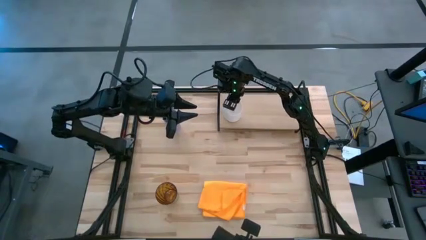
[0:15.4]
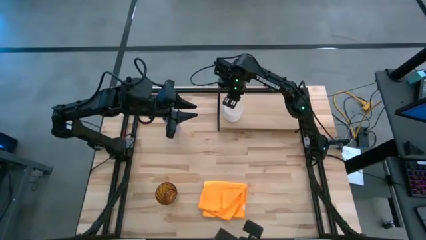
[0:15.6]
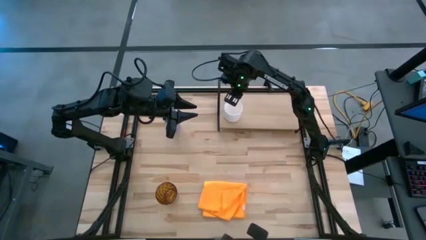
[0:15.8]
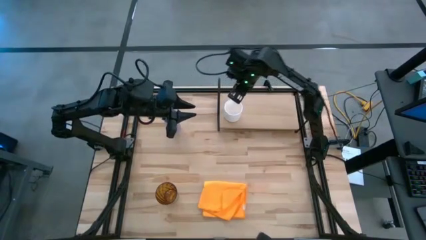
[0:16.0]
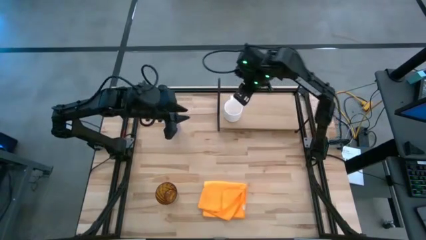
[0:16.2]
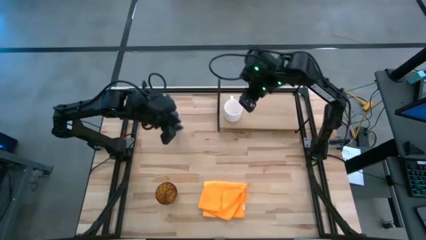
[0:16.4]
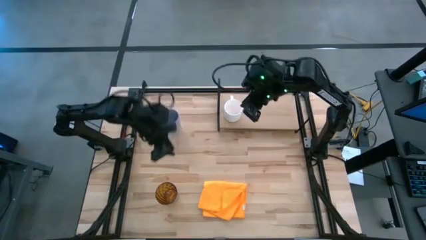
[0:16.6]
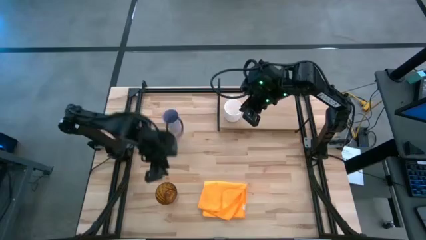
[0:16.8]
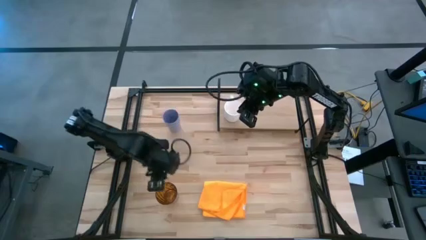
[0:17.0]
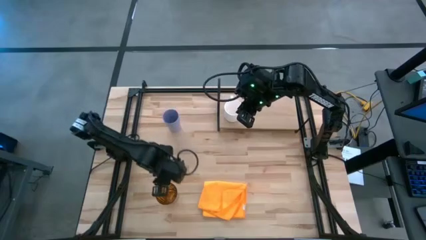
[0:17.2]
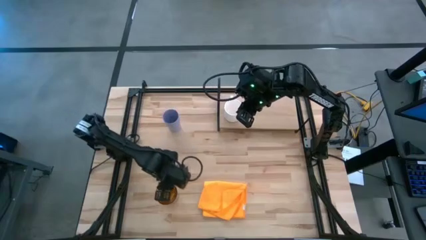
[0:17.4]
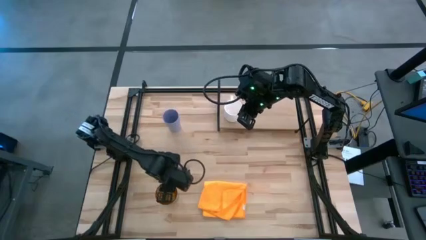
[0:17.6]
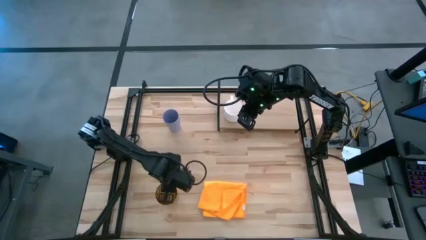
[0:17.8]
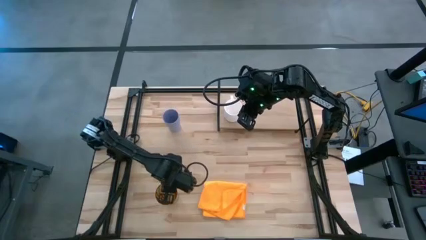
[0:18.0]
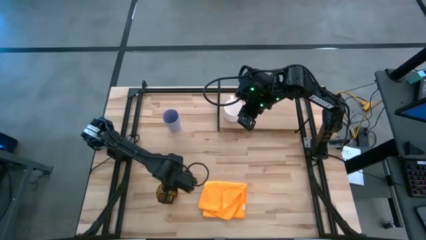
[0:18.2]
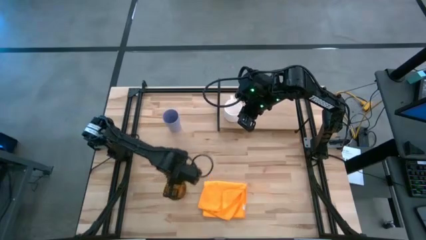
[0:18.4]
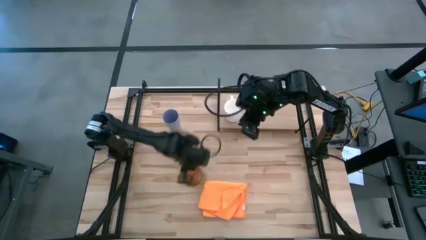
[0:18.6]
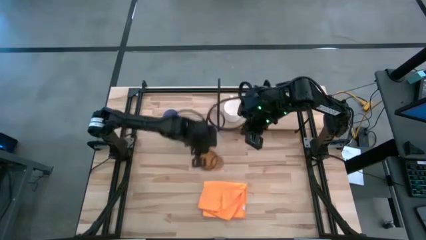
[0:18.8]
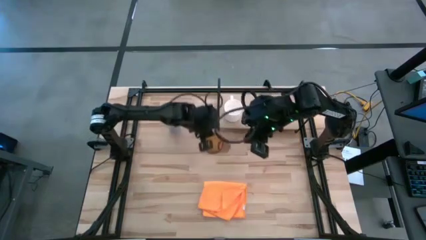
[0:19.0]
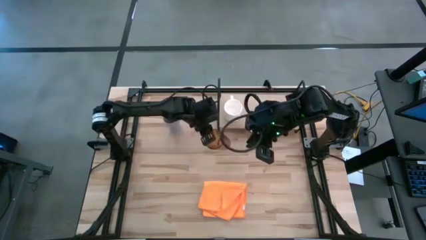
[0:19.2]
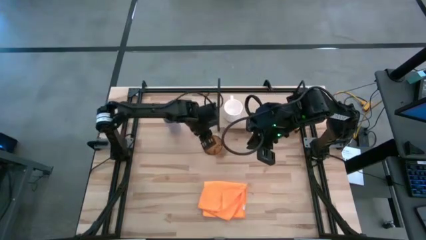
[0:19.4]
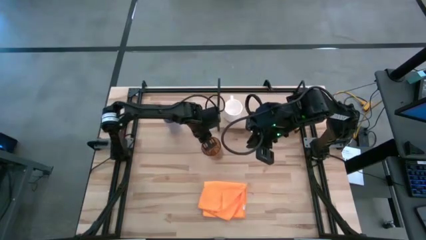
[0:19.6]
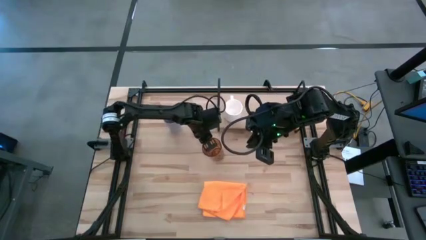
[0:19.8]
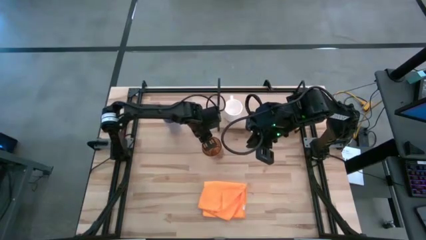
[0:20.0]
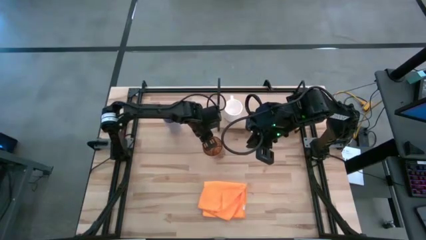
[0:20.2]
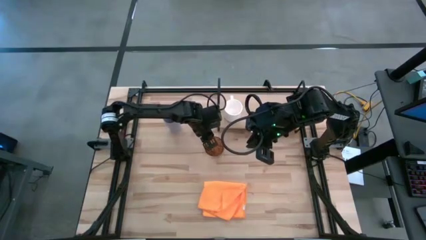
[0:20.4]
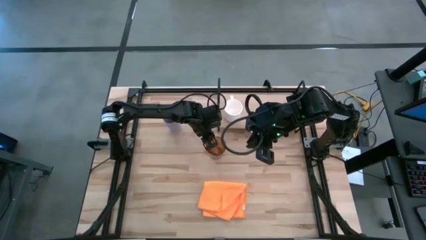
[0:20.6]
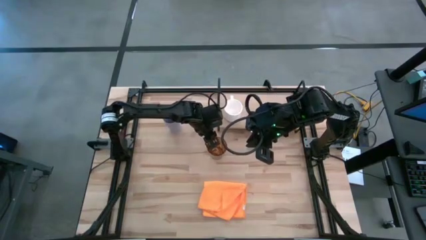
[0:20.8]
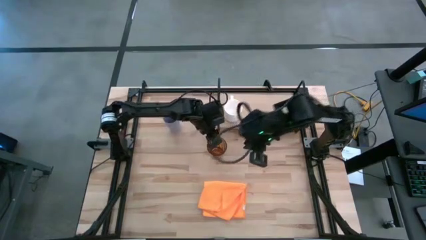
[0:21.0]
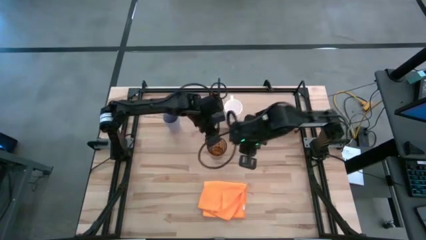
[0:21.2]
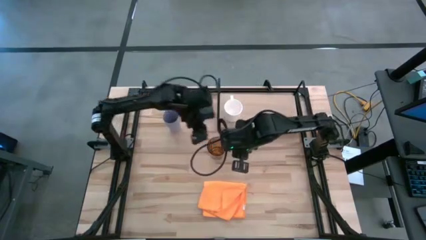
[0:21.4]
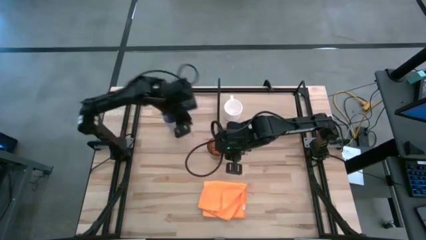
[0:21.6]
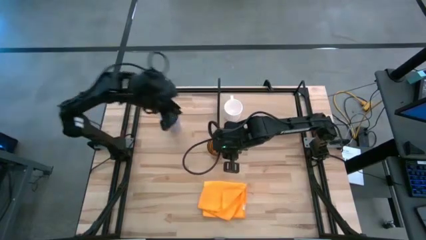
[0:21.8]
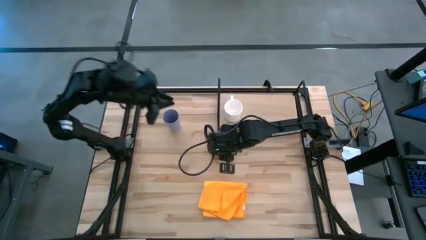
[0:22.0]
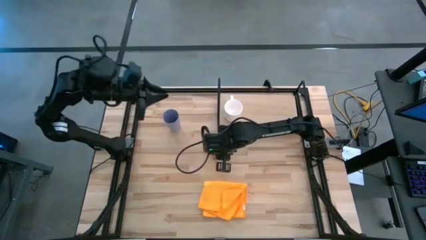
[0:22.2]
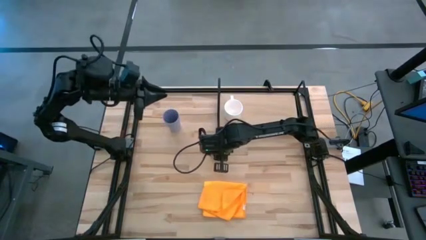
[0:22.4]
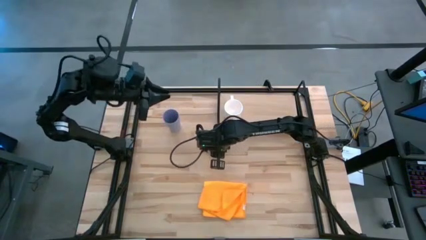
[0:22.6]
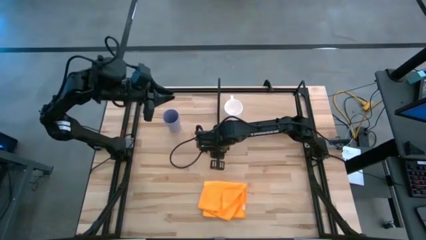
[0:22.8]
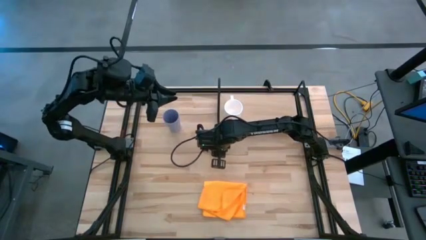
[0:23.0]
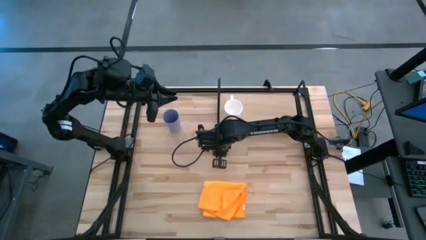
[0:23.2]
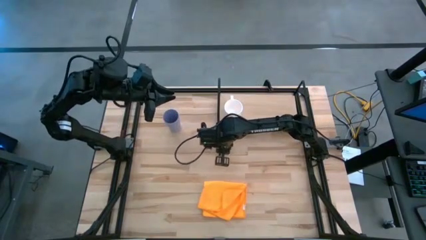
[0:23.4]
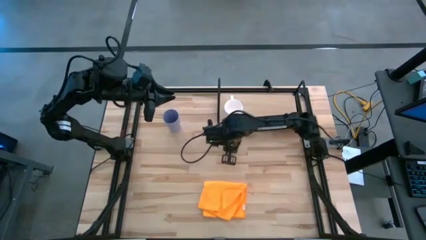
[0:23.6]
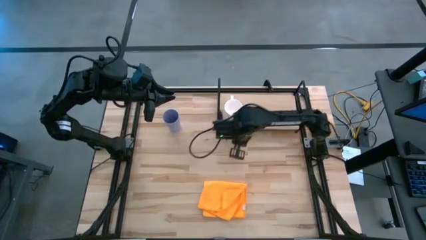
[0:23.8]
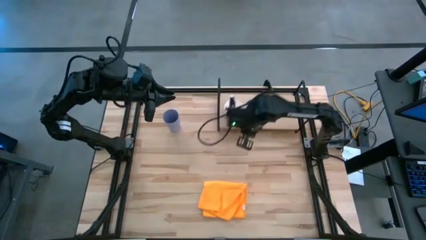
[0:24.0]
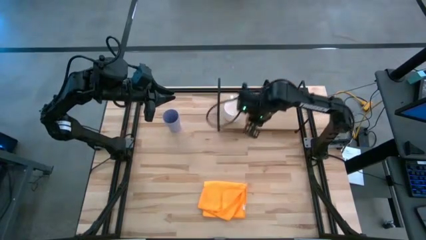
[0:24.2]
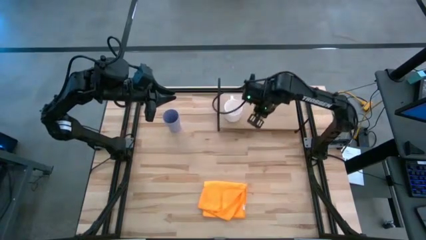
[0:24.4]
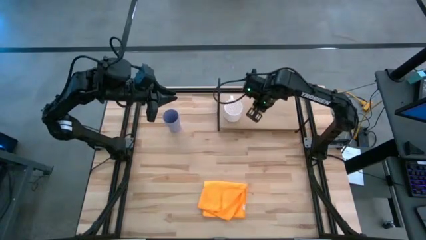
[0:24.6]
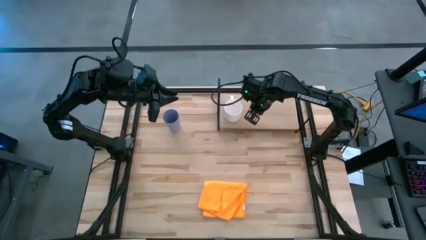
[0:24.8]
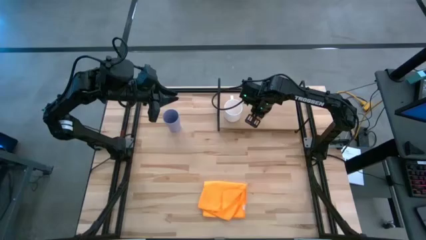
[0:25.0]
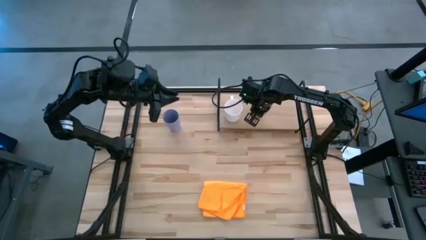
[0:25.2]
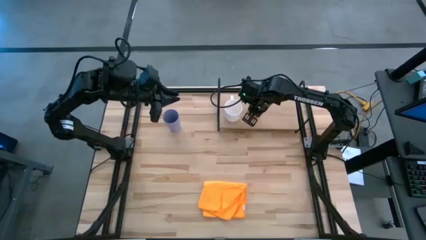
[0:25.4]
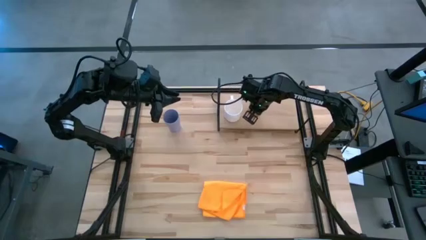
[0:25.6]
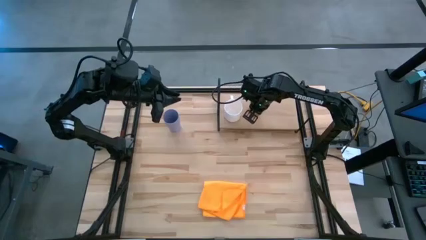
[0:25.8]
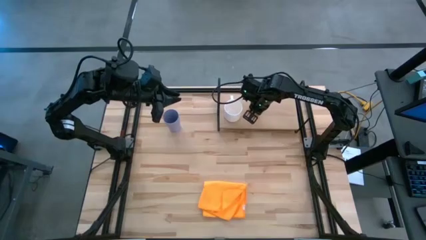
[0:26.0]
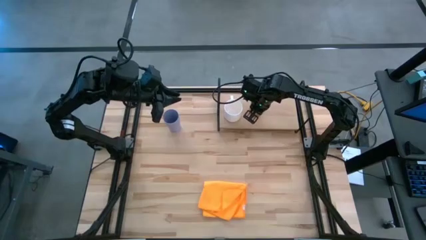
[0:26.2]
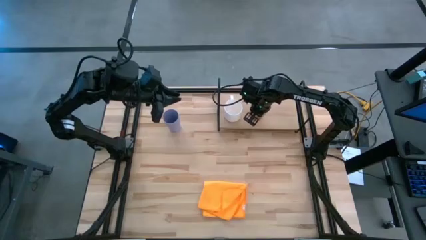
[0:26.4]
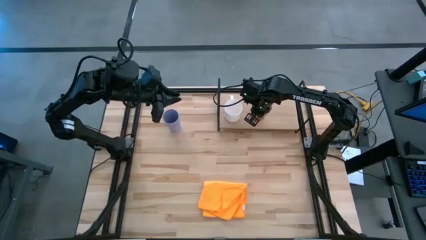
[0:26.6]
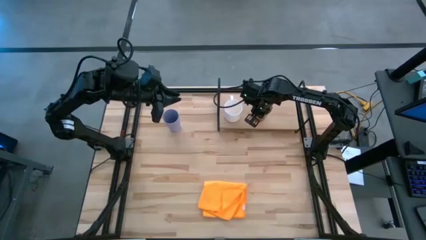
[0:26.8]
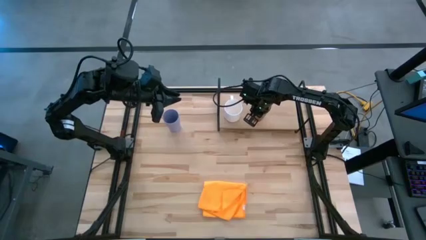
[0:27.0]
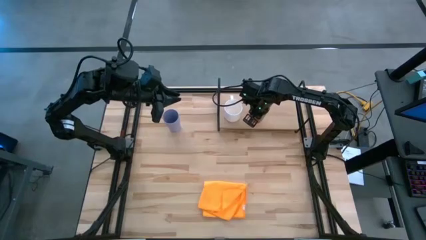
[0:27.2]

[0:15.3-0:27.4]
Task: Stack small to large cups/mugs on shelf
Put the brown cup on the shelf

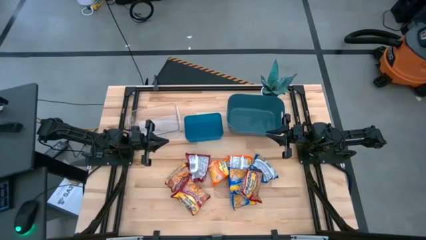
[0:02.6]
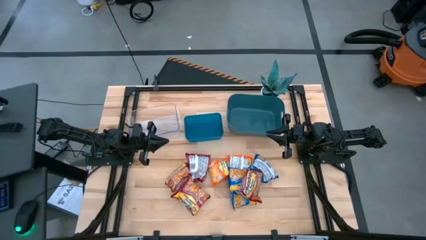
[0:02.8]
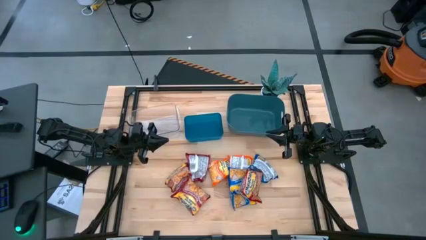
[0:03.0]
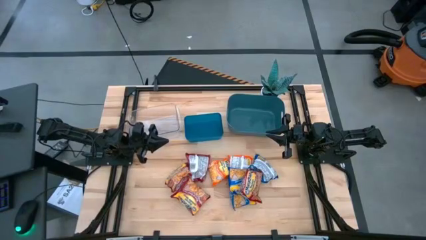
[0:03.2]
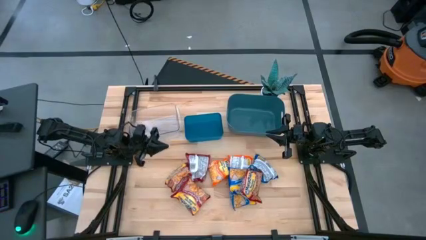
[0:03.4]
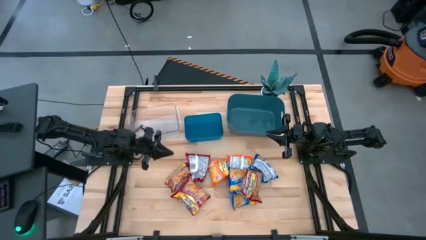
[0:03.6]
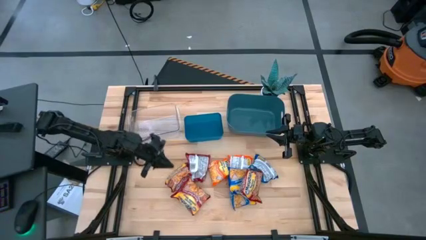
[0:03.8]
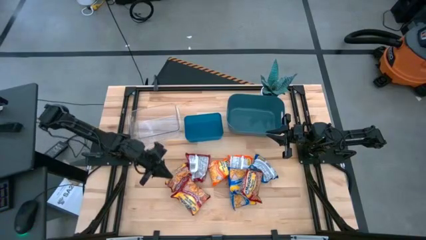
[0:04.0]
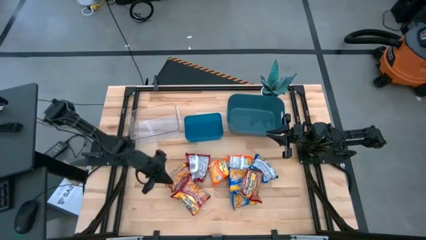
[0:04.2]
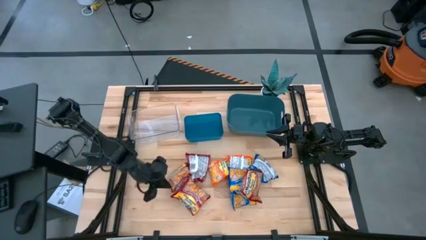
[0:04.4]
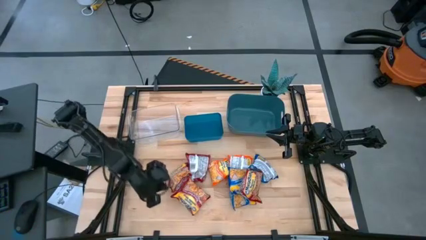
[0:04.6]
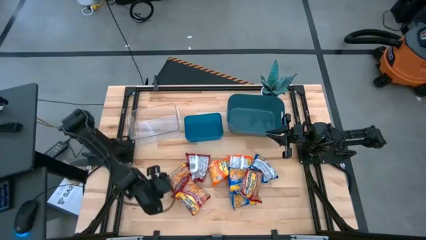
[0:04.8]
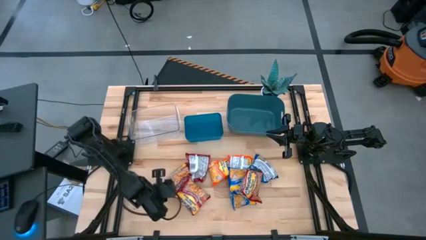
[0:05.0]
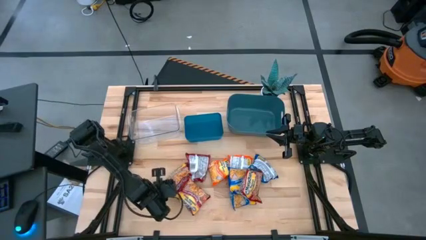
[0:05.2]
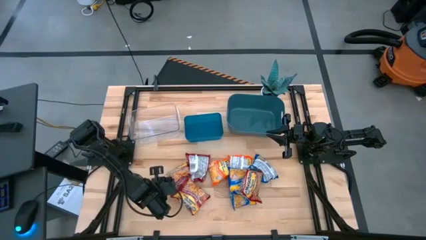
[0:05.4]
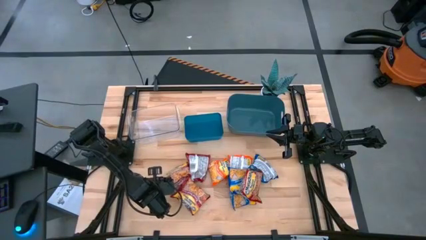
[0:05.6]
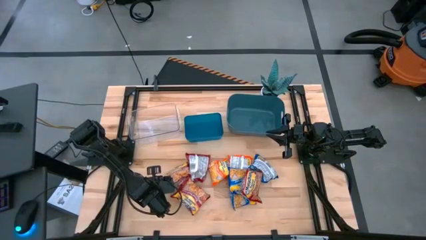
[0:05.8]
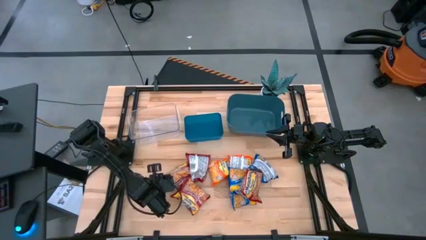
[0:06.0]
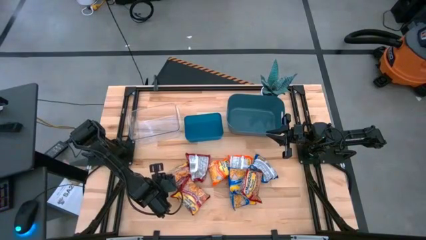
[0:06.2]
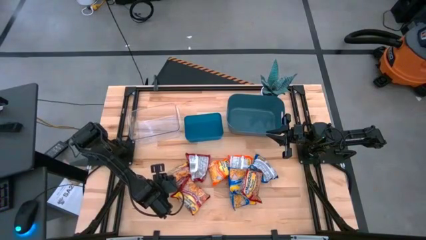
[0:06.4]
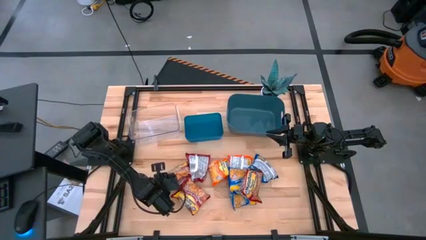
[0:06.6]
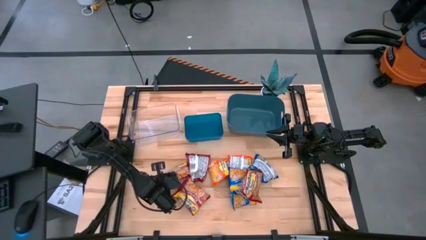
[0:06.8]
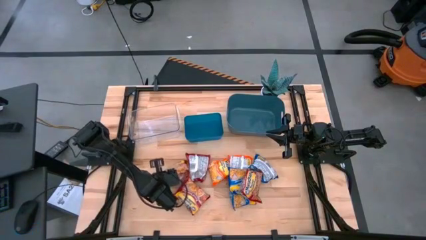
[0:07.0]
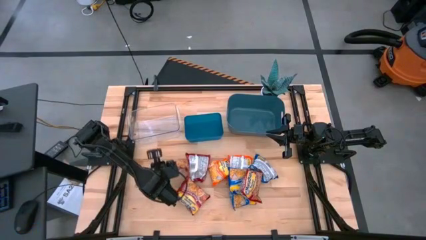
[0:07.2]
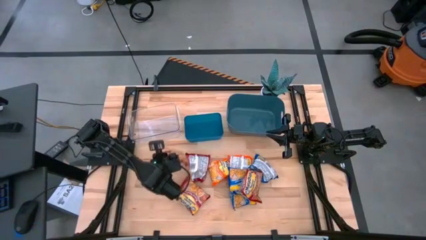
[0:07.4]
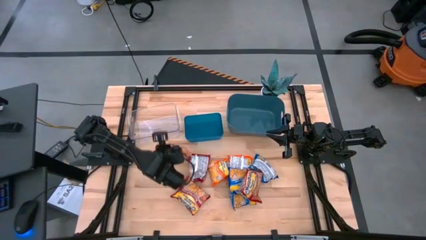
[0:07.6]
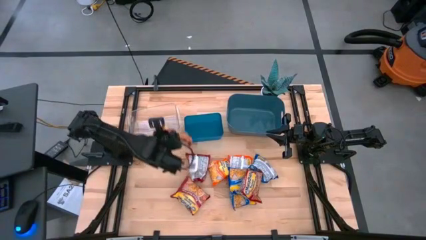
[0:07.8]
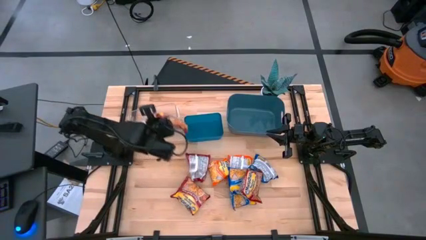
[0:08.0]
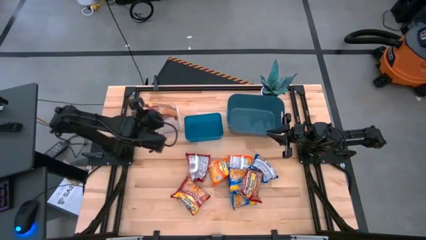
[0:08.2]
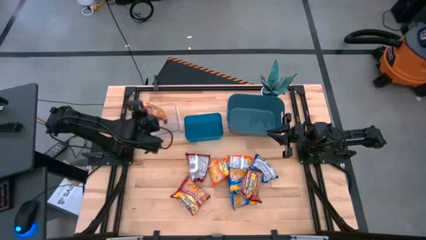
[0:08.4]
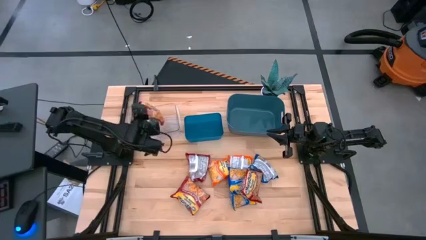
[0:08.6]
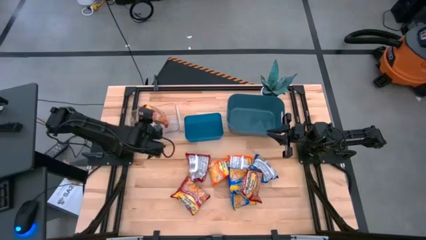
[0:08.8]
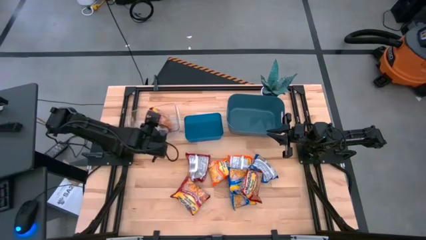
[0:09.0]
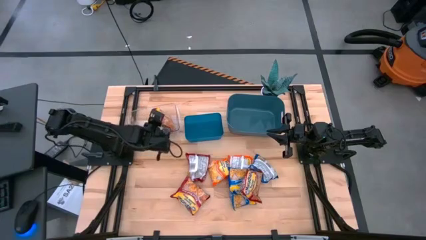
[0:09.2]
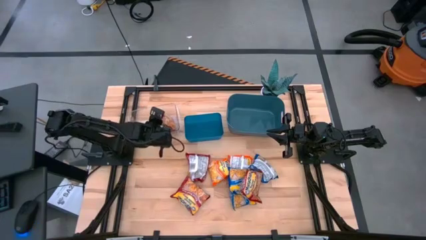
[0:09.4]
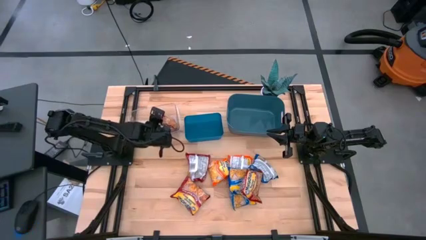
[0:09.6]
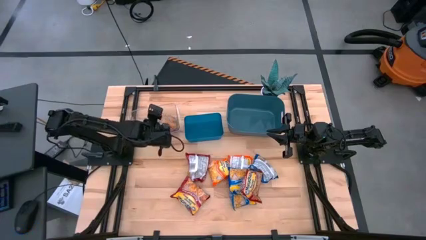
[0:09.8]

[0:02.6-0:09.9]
Task: Sort Maruchan noodles
Put the red noodle pack into the transparent bin
